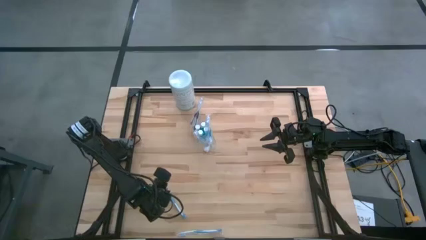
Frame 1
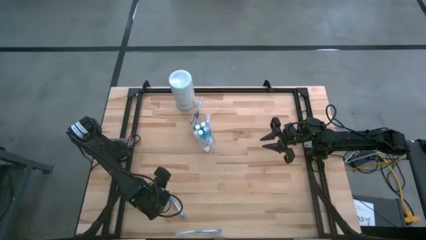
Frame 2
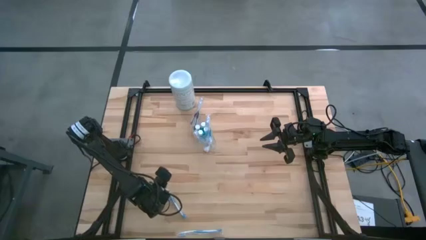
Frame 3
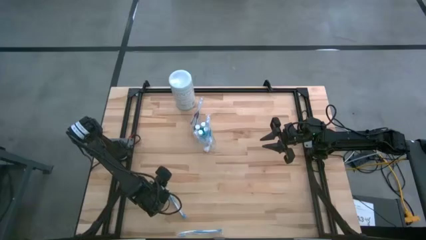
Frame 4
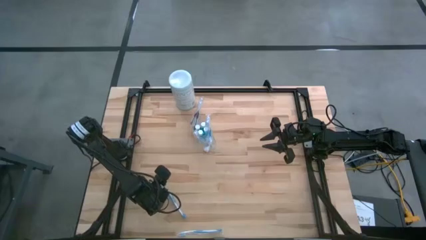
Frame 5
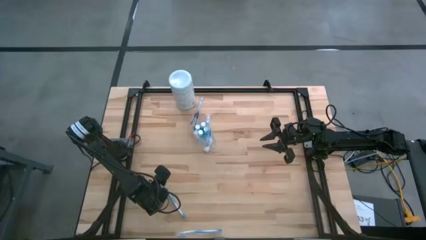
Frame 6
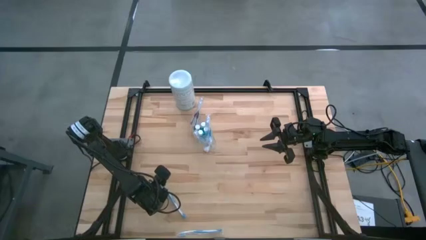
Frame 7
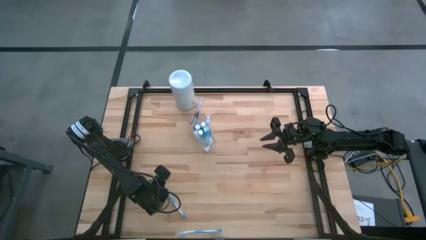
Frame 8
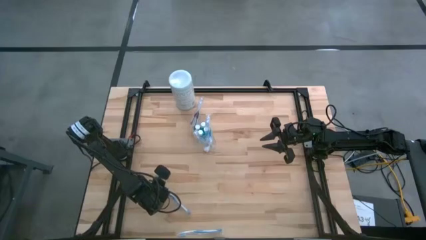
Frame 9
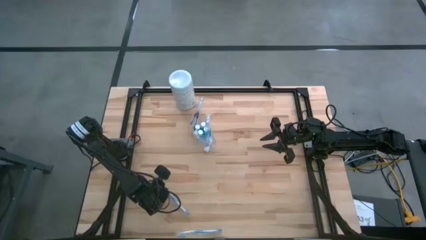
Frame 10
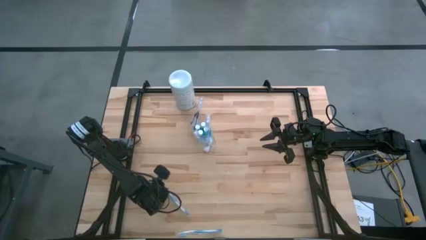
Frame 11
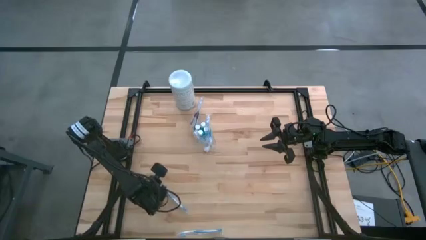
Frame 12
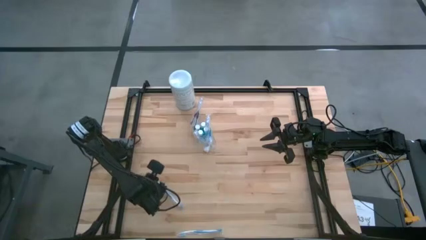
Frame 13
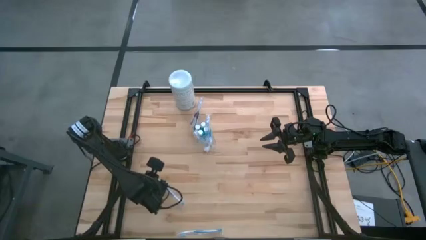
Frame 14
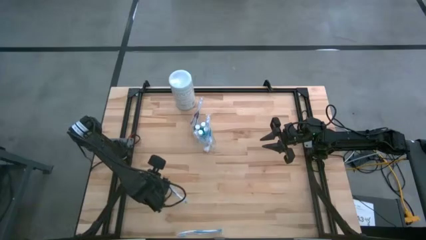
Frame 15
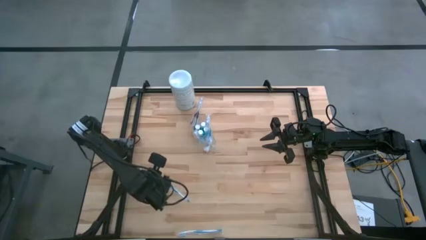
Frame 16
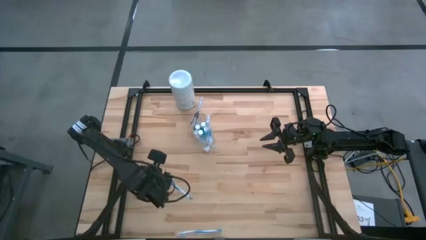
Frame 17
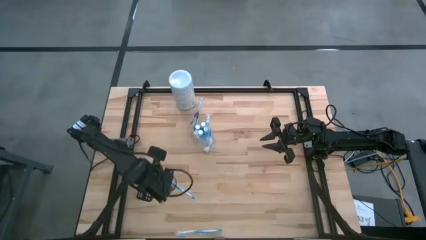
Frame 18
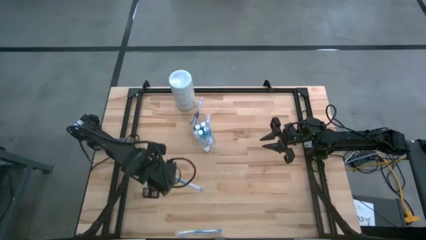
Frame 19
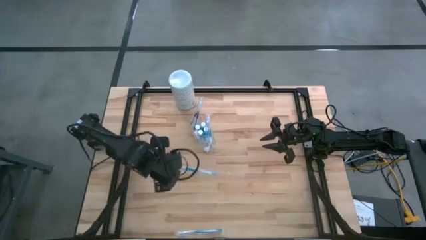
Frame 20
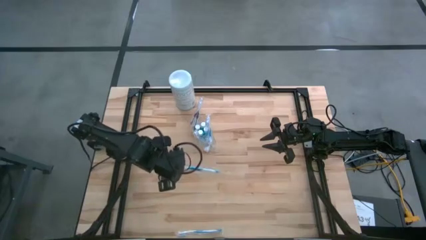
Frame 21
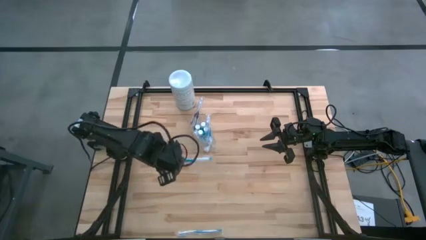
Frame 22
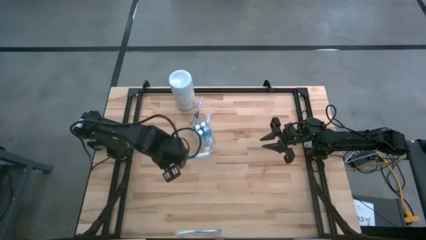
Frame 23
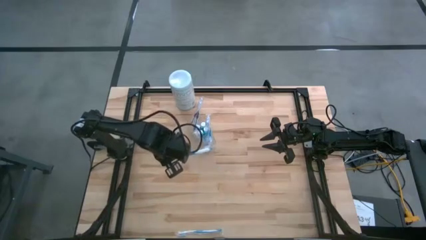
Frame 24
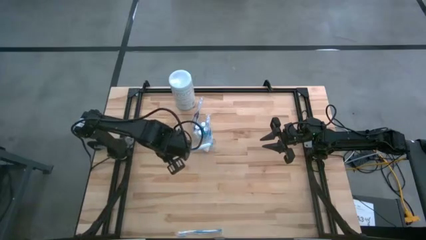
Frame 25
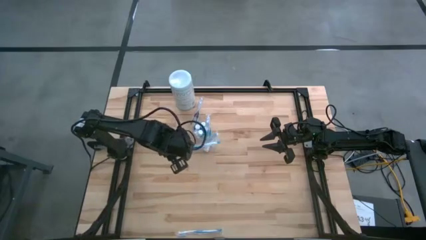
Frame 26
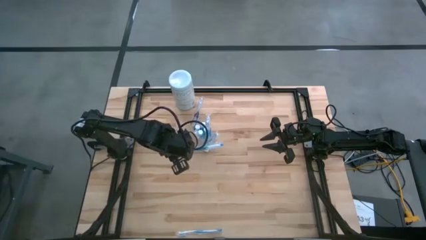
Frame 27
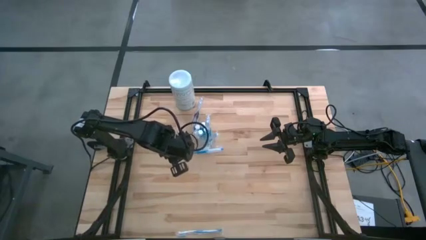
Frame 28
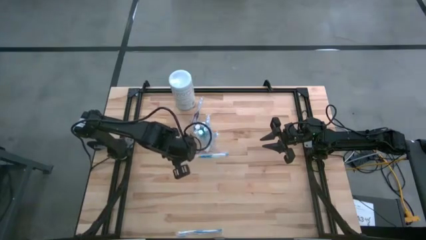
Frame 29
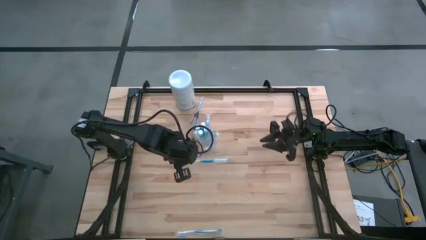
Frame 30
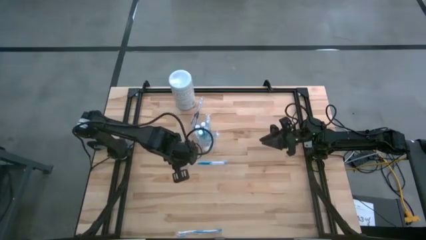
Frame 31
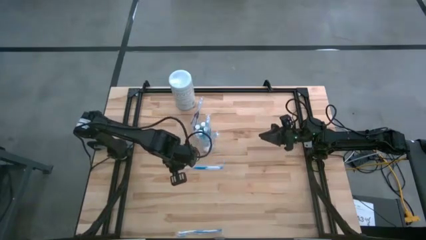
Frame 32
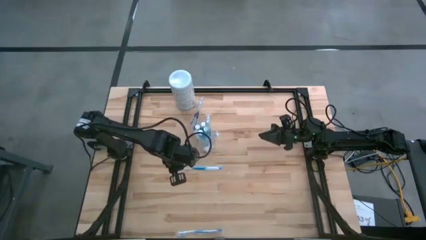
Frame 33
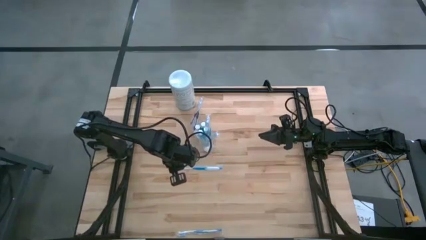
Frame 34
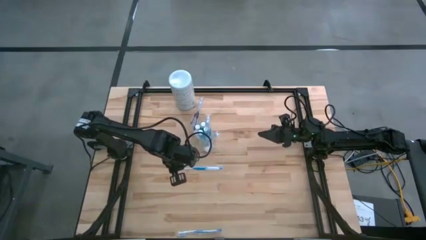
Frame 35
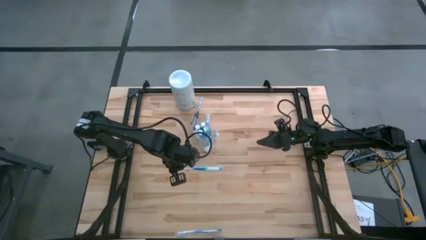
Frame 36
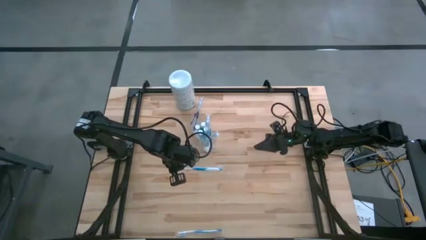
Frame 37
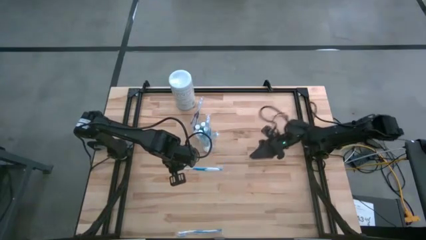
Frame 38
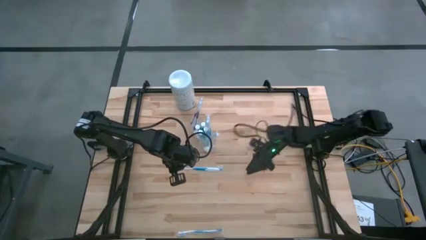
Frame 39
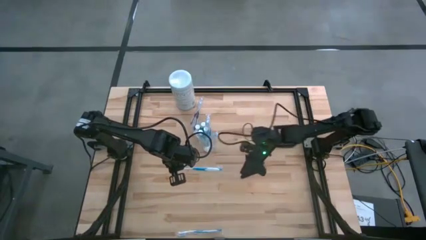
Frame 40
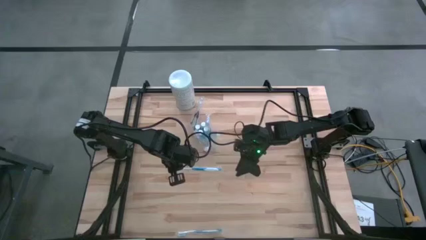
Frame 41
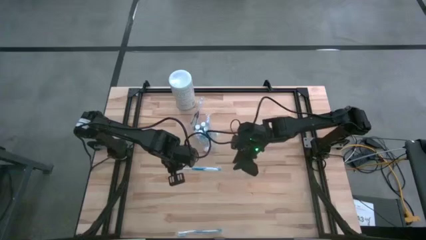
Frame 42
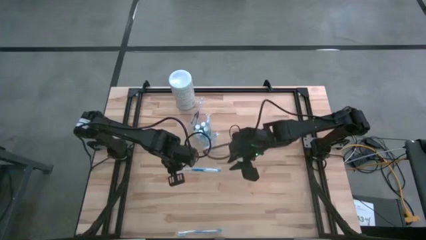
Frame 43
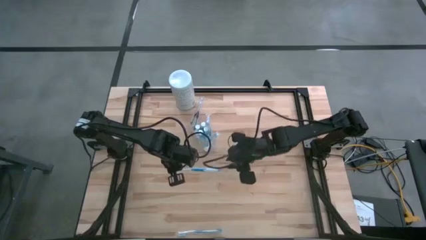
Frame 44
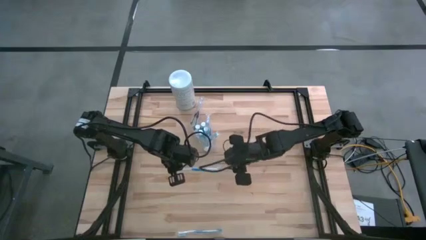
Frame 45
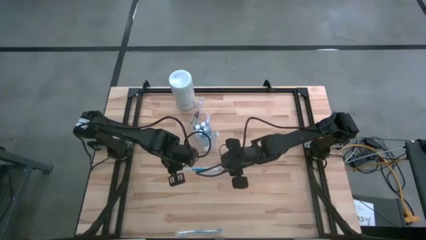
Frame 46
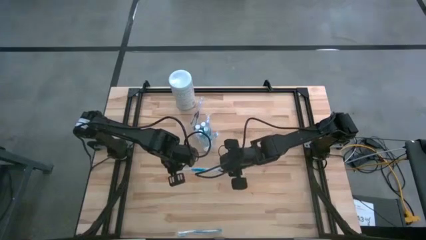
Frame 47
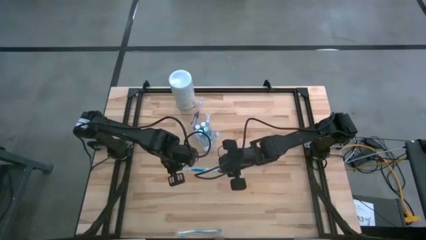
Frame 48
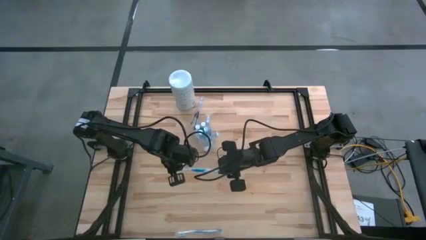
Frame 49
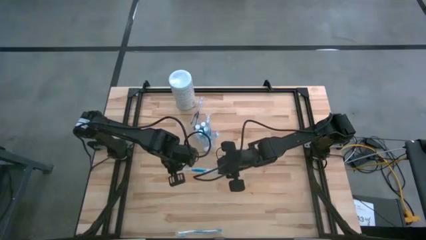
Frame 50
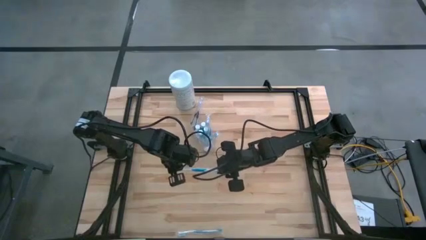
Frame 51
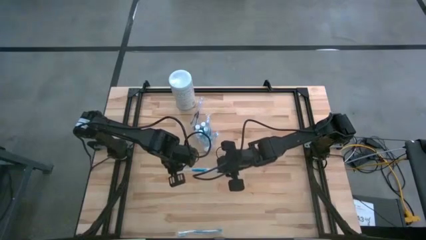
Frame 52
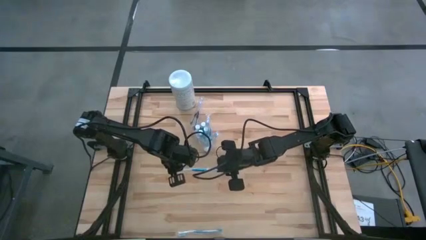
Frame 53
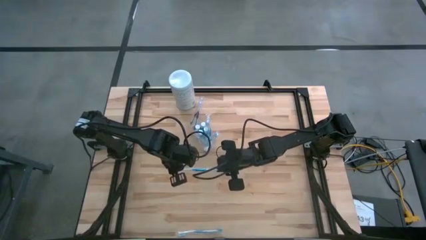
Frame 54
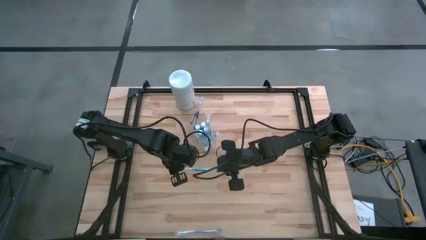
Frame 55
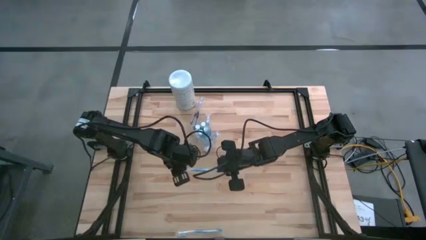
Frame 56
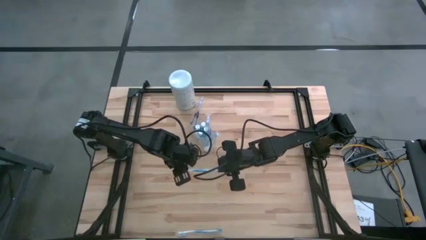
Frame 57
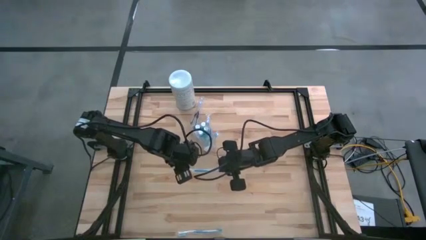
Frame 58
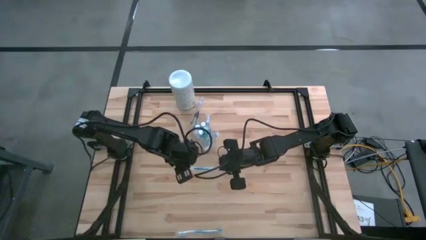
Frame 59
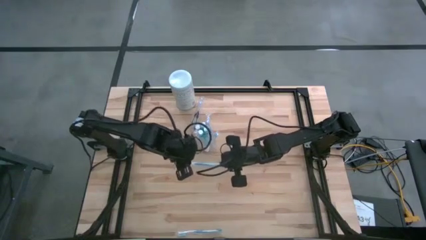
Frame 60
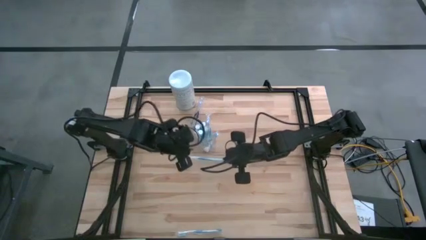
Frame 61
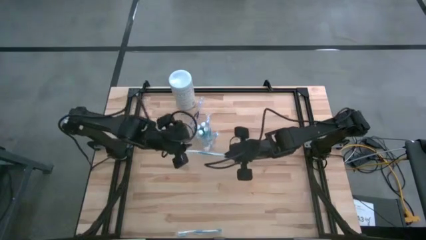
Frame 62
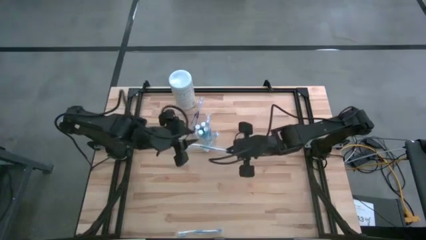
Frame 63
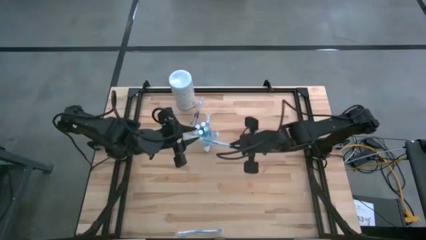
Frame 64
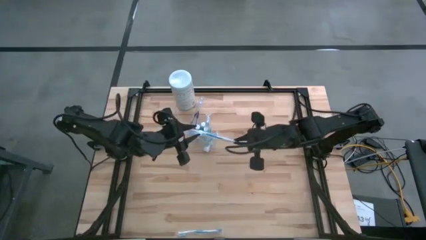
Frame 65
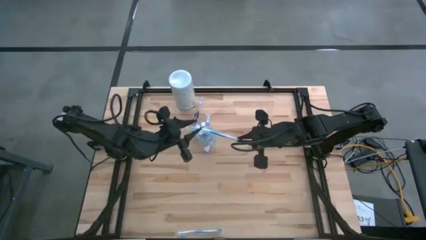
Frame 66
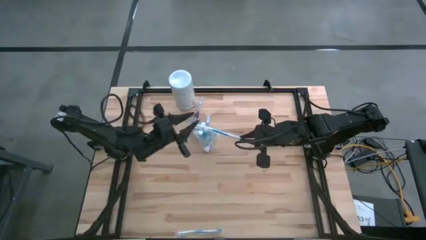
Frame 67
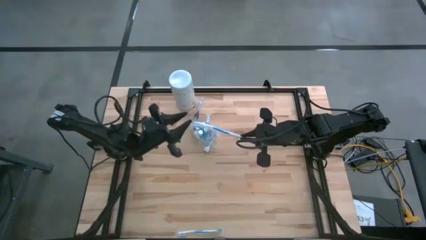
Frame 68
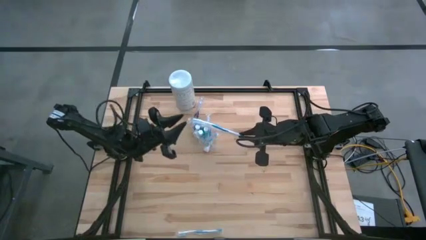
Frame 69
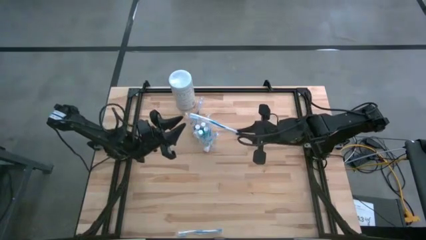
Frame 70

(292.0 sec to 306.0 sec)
Task: Pick & Place toothbrushing station
Put the blue toothbrush into the right of the transparent organizer

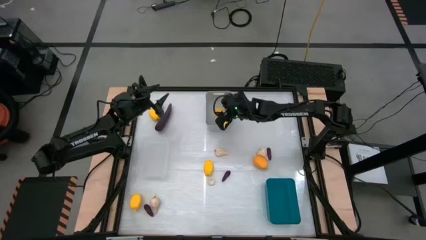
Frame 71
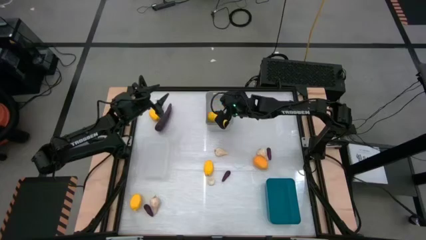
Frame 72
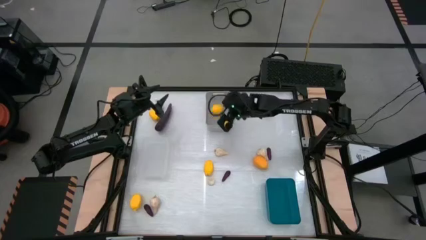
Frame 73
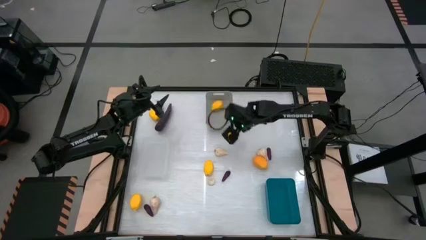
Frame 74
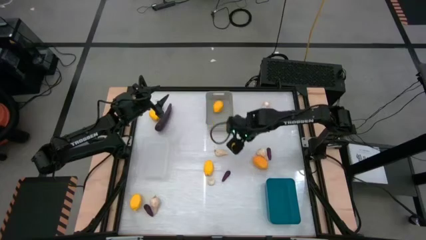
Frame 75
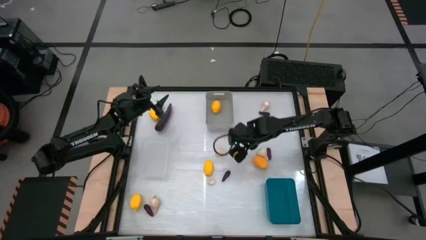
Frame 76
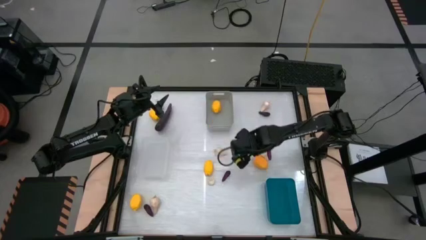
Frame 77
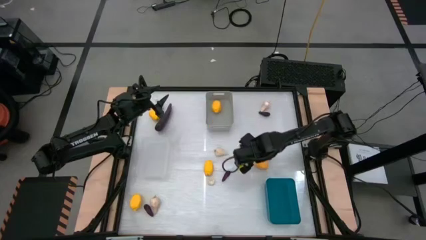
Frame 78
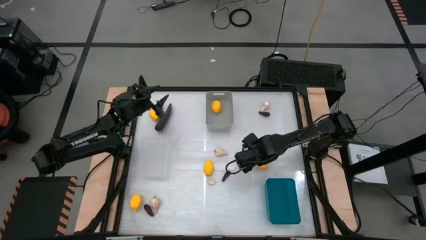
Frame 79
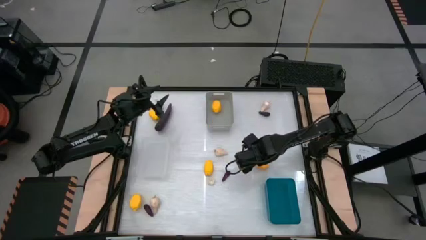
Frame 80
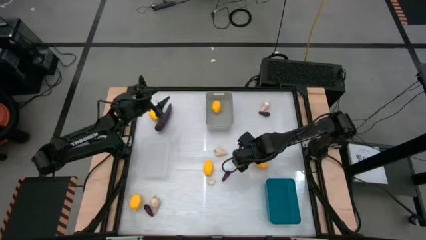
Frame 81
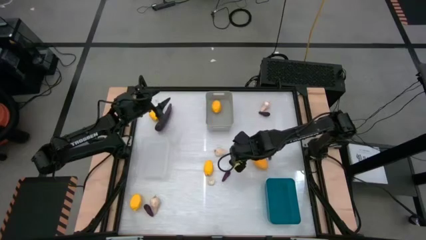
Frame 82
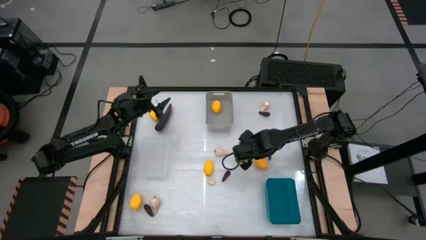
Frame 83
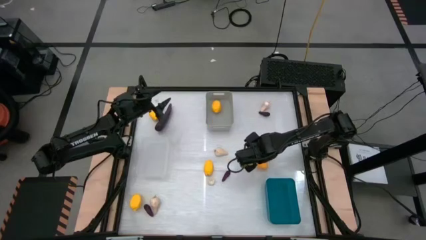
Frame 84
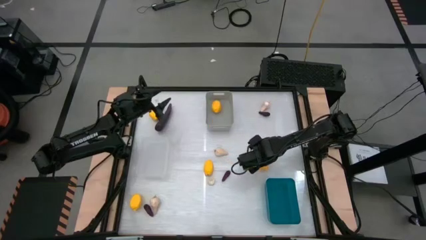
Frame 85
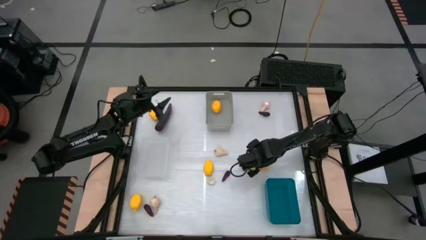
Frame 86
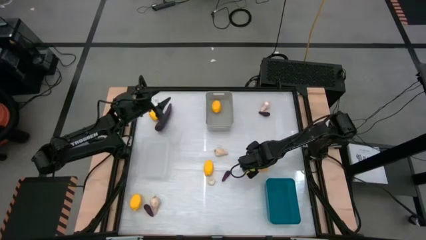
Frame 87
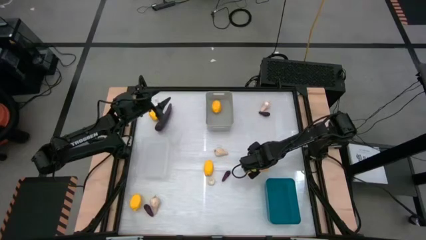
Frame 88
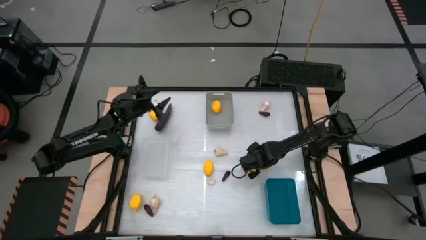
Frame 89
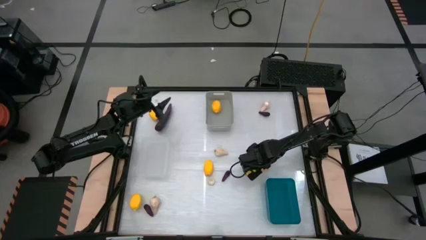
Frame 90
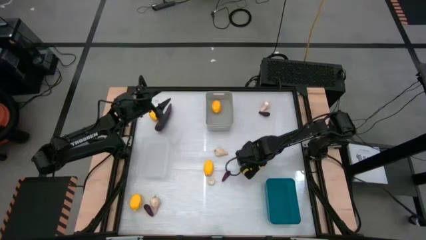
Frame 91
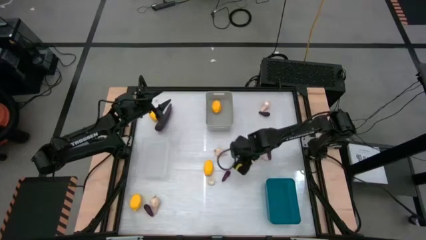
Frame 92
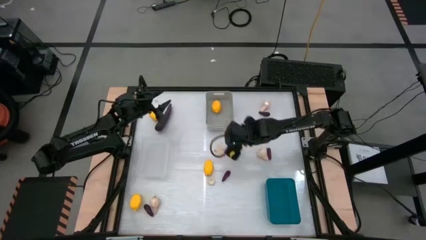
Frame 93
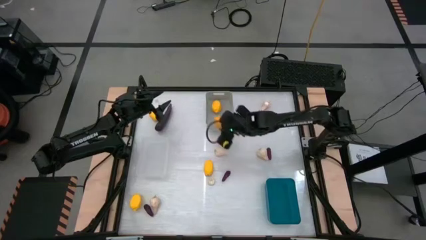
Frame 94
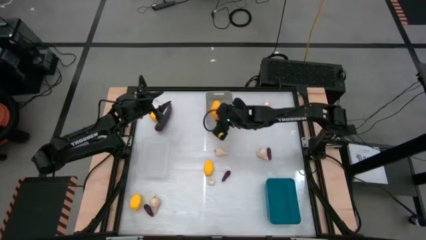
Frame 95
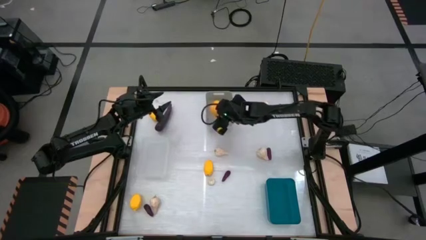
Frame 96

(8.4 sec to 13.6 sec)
Task: Sort produce into baskets
Put the lemon into the gray bin
